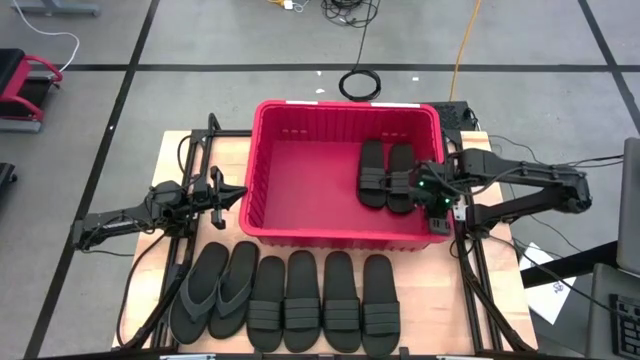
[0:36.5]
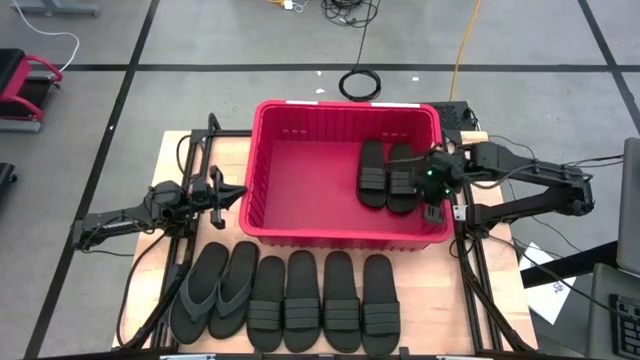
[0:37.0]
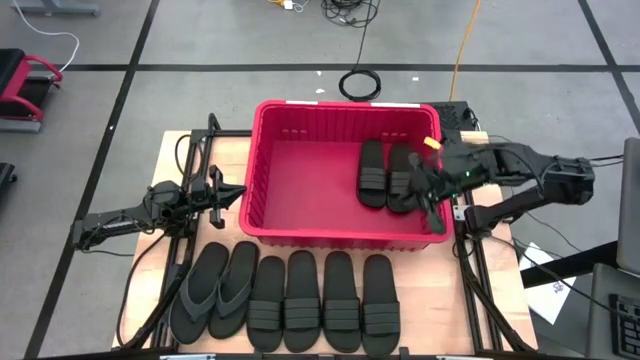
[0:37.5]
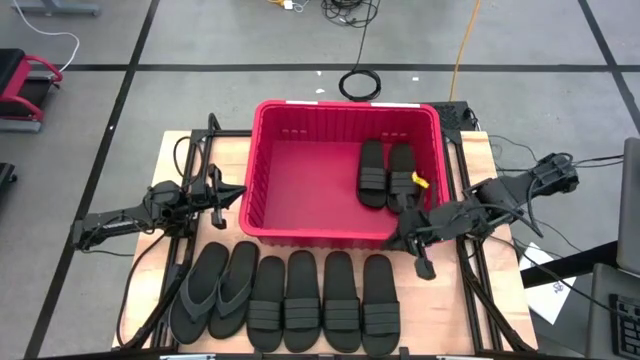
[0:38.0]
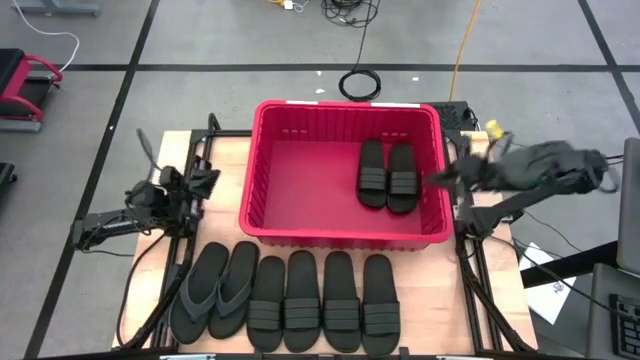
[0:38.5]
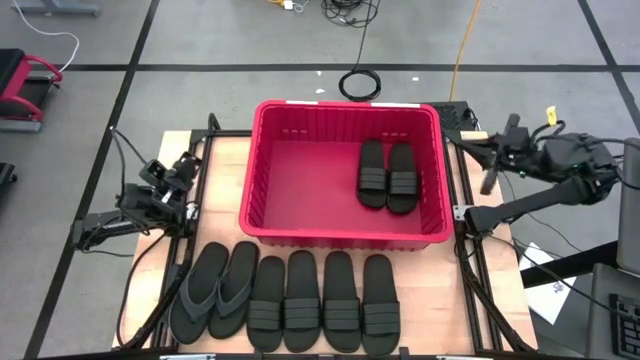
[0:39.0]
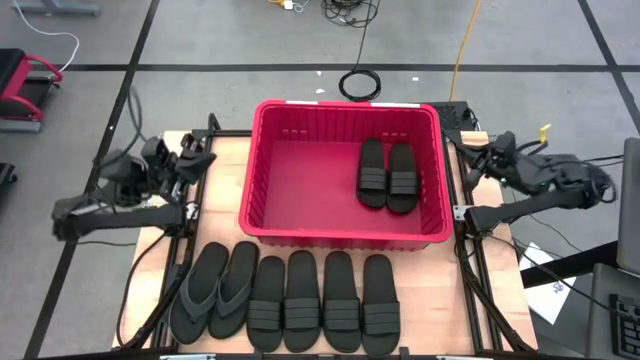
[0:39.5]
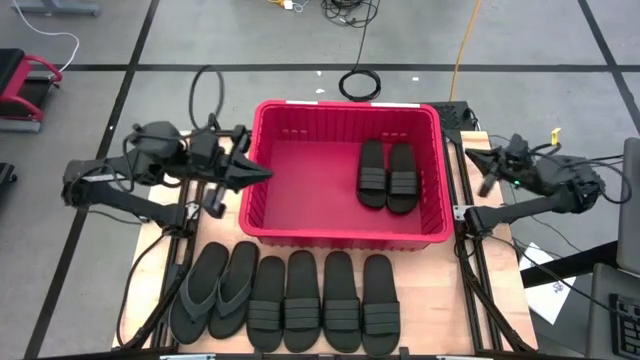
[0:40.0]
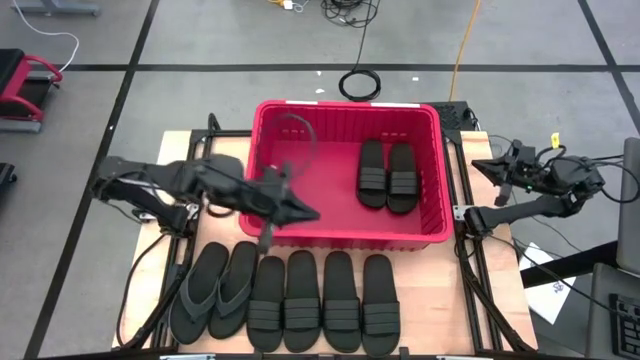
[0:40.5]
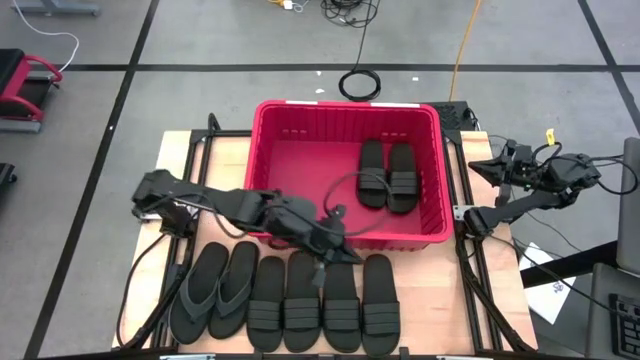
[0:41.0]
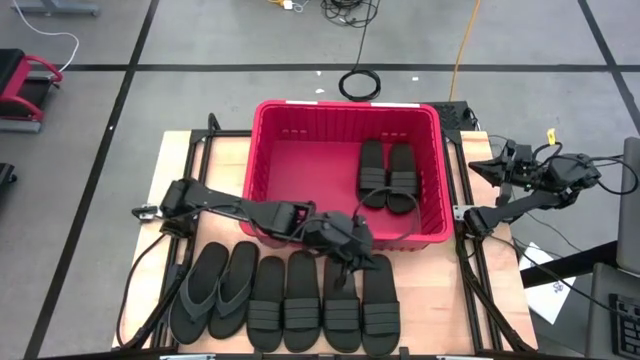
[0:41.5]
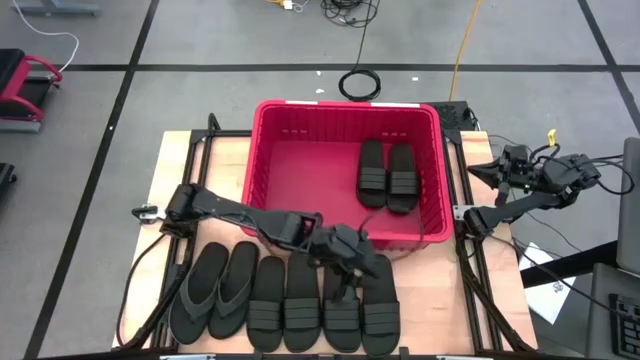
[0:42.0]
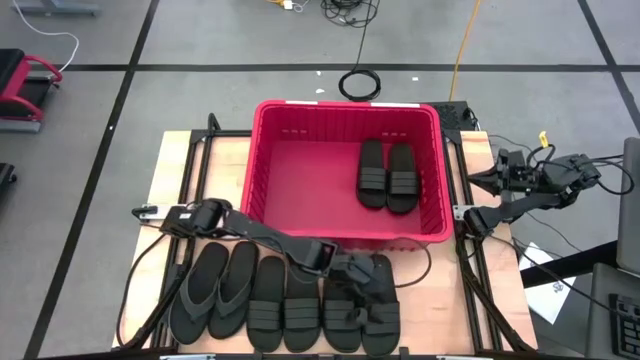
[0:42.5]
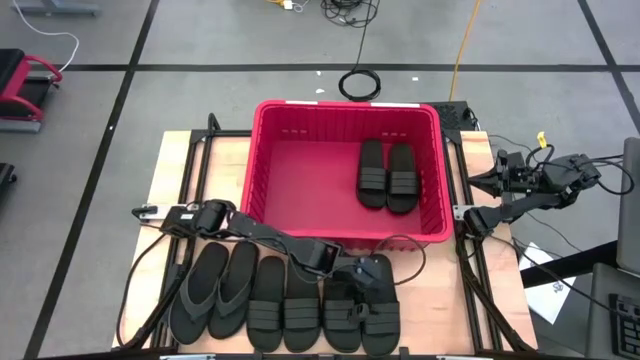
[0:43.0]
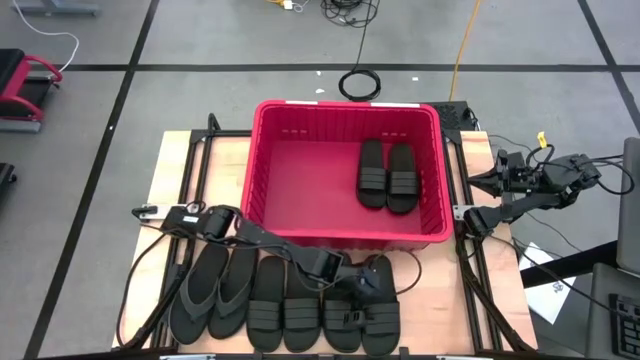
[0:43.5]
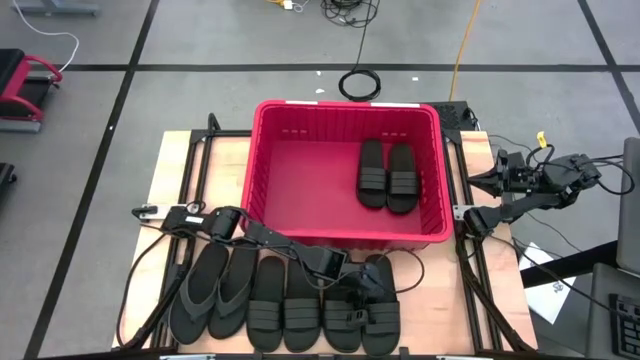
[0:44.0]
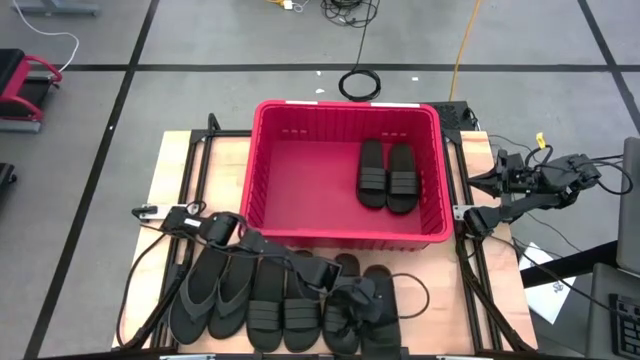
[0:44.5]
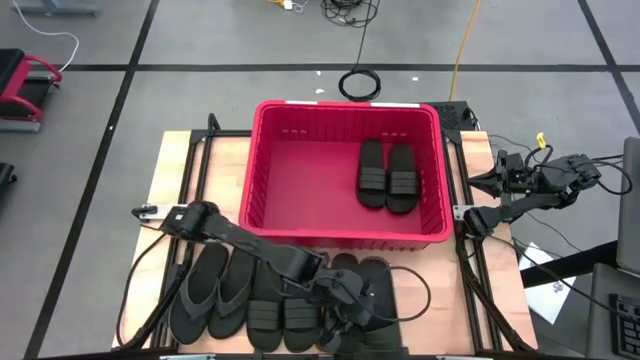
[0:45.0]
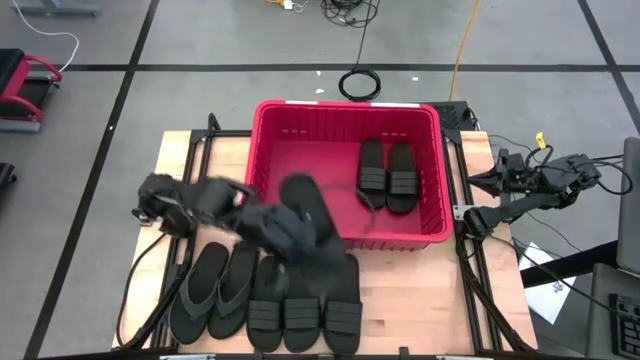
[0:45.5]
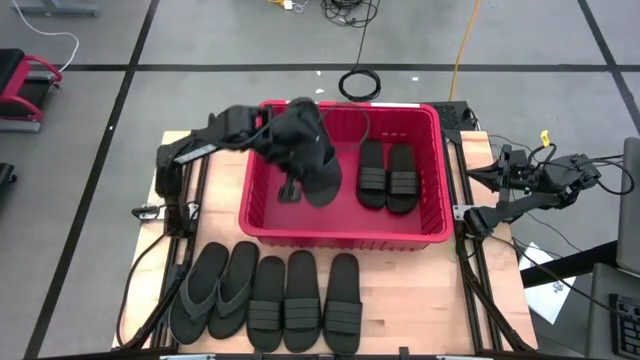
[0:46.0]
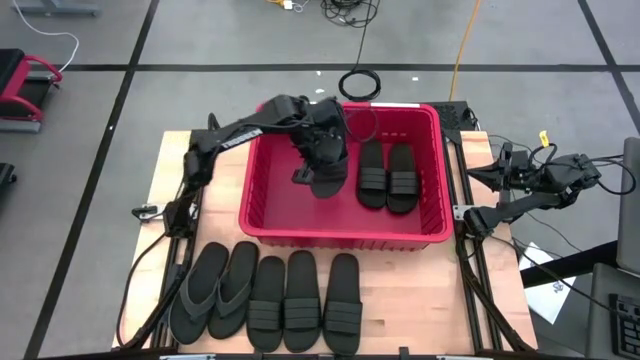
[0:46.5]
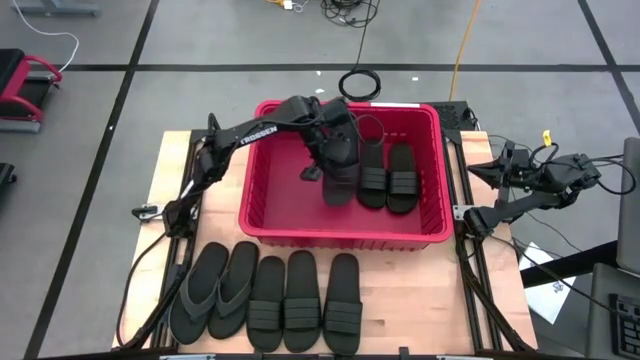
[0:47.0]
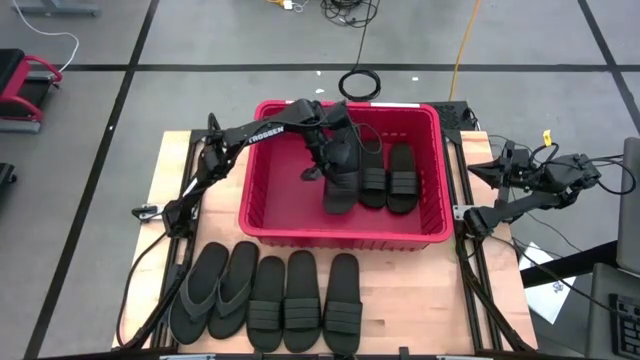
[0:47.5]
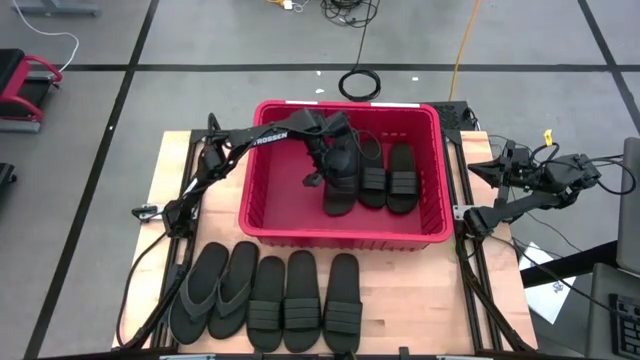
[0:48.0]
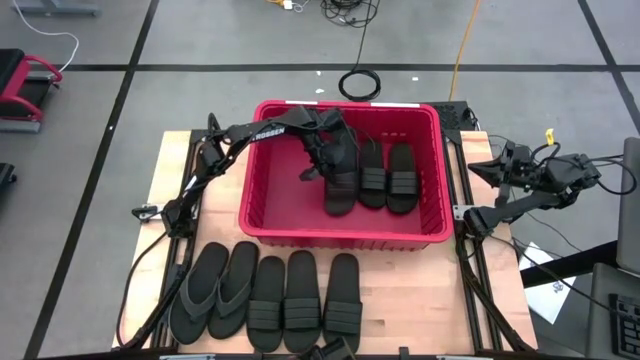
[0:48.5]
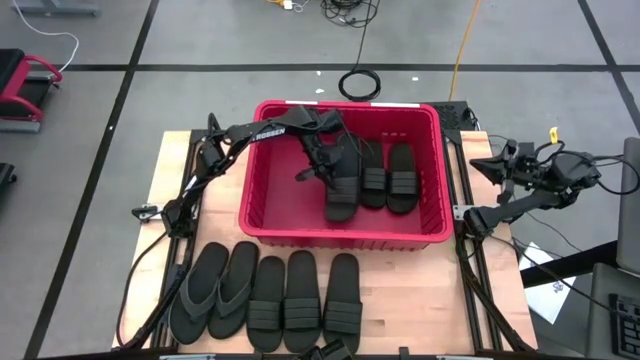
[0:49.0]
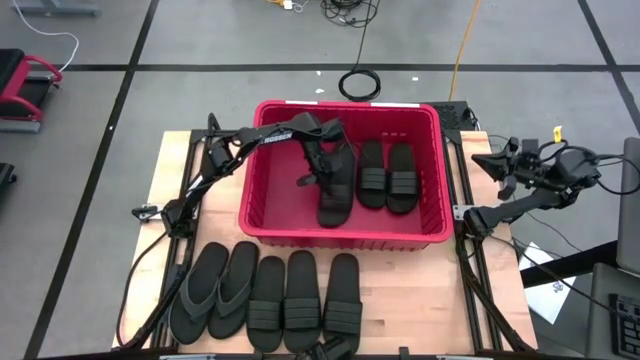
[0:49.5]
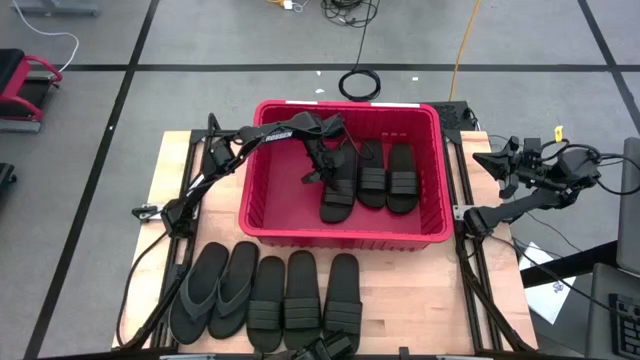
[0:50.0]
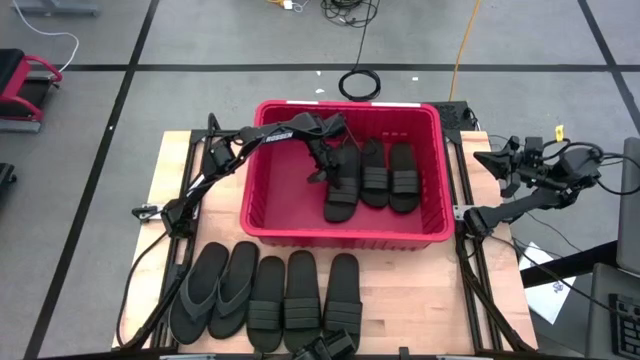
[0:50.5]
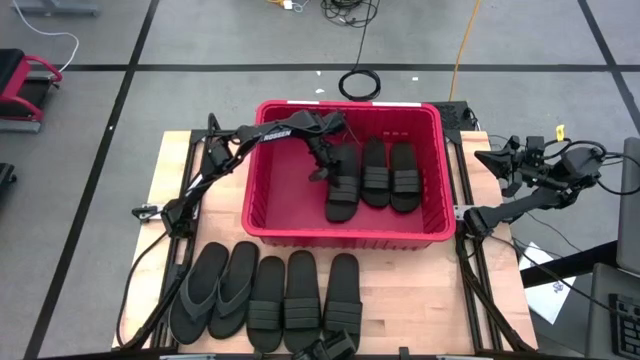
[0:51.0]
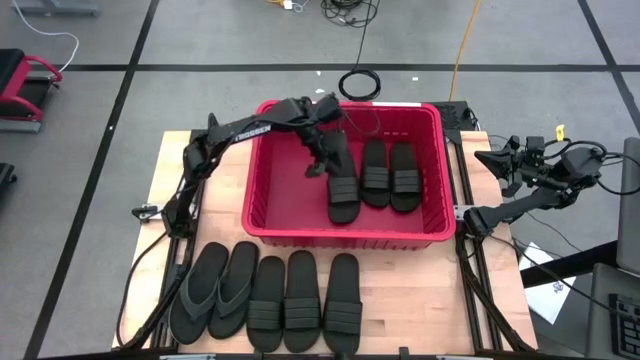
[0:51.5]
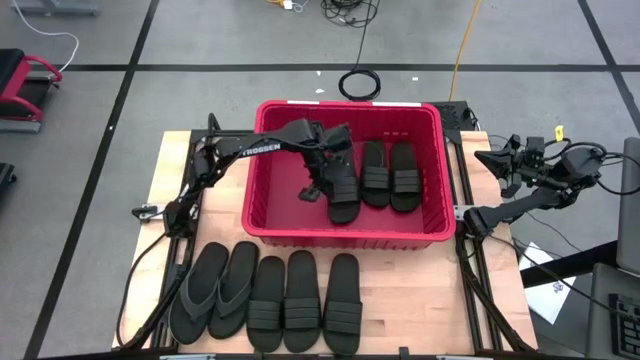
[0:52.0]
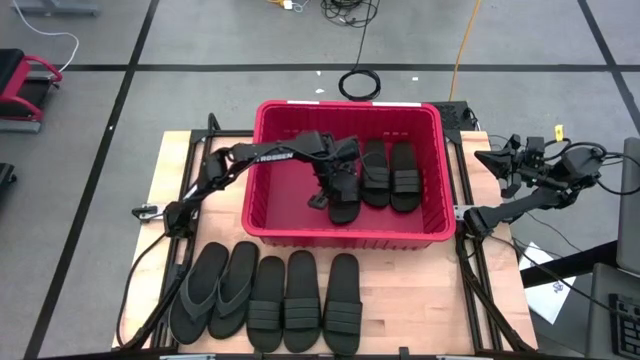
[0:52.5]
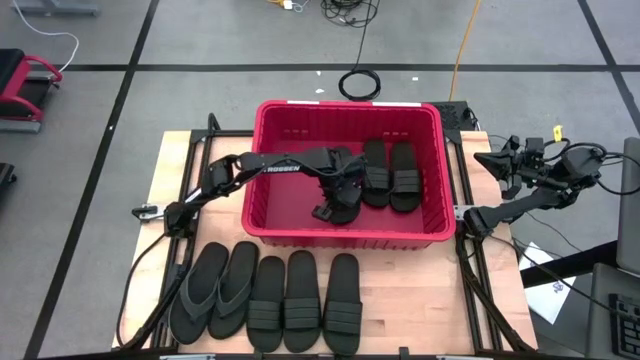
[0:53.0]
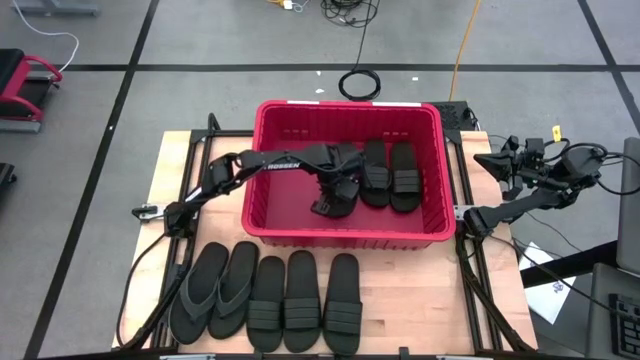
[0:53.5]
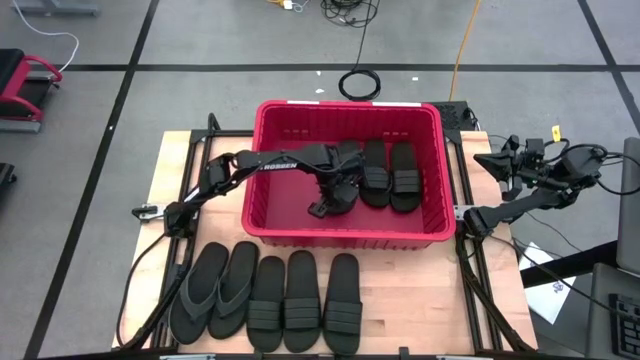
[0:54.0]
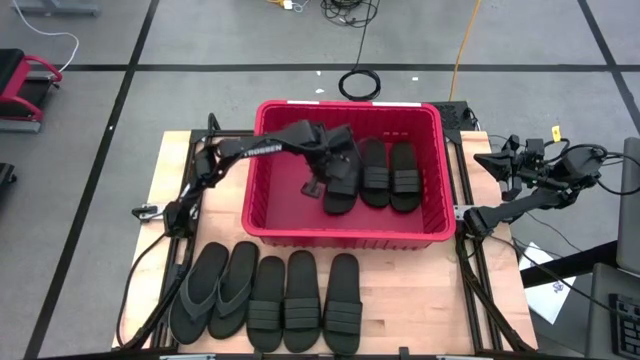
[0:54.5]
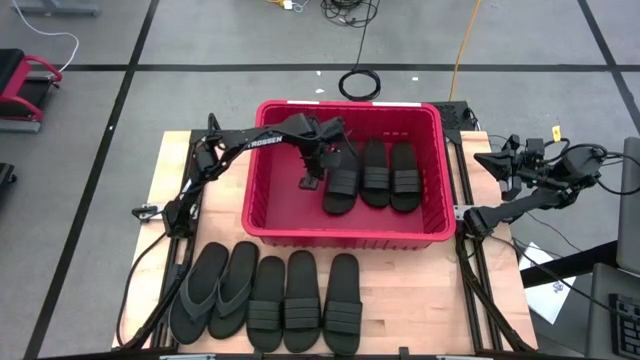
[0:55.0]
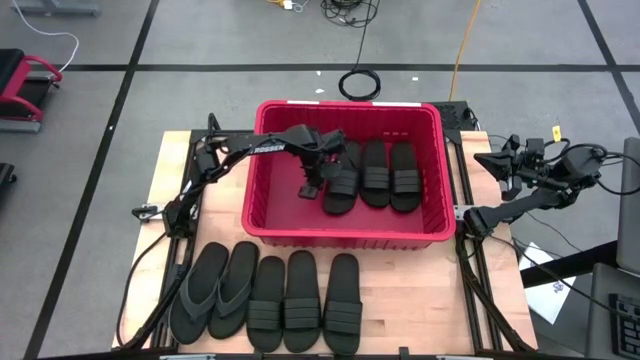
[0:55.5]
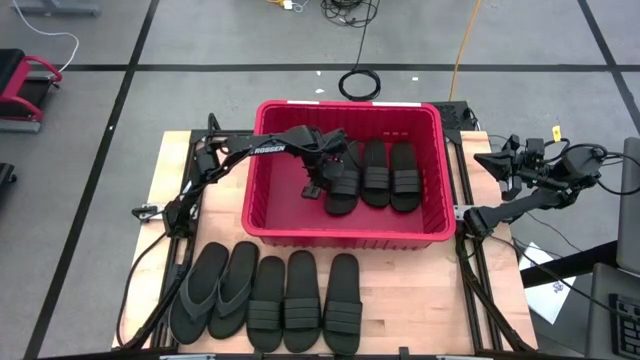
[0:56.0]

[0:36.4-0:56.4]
Task: Pick and place slides into bin
Put the slide into the red bin

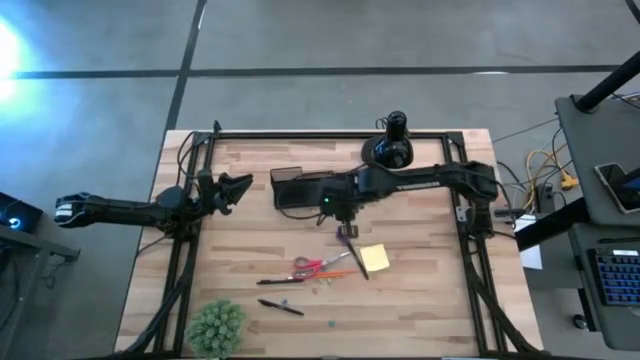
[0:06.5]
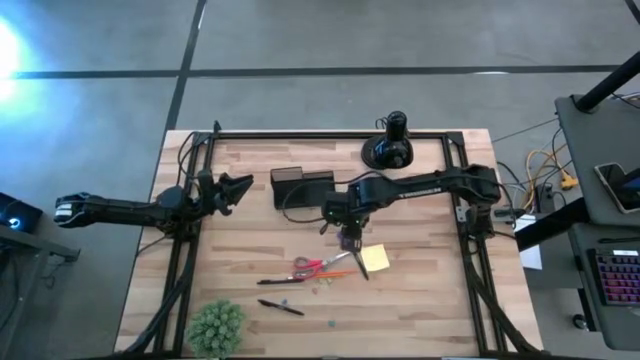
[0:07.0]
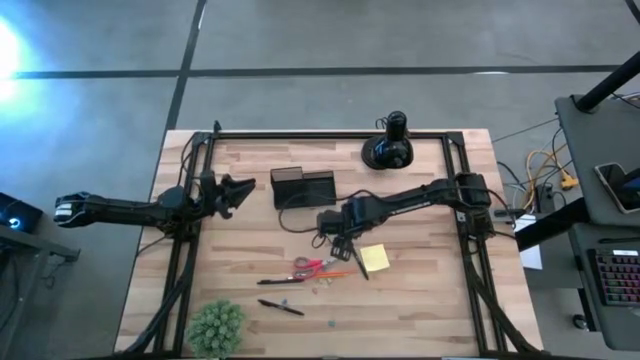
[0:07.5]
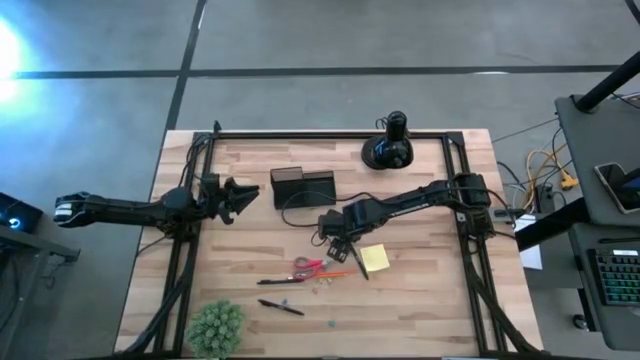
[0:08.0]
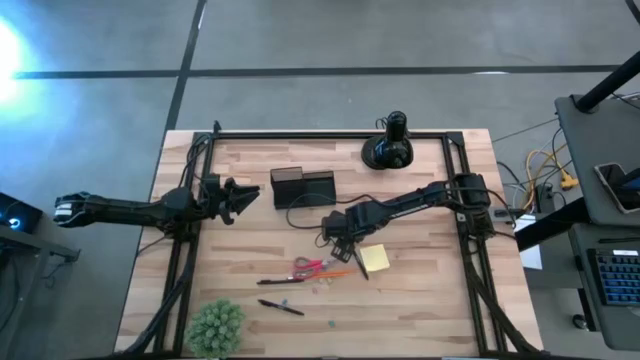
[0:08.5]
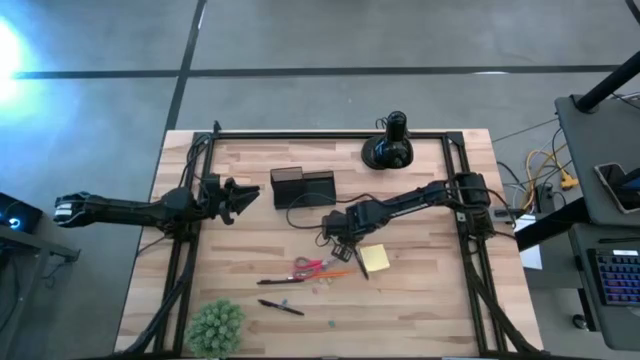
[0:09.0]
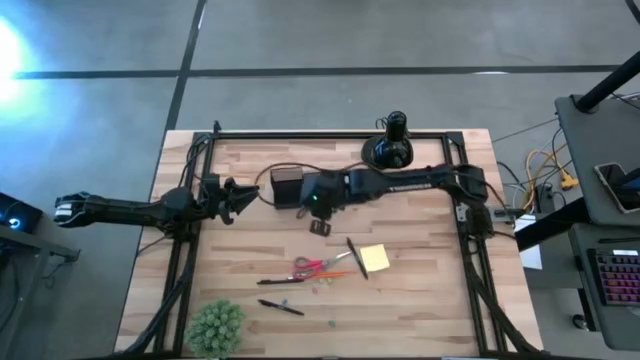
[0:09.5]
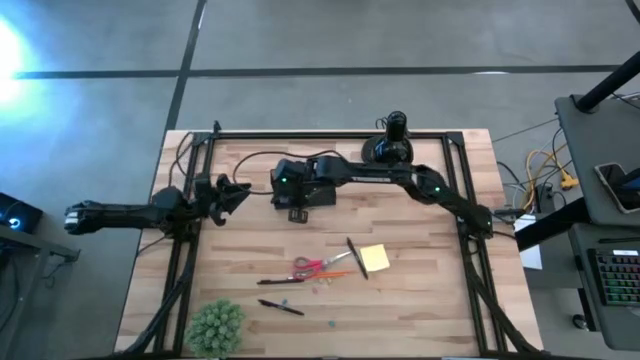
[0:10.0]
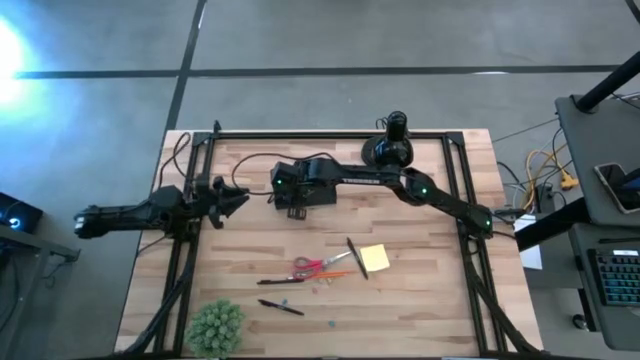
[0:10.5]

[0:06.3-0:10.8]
Task: Pick and place office supplies into organizer
Put the blue eraser into the black organizer
